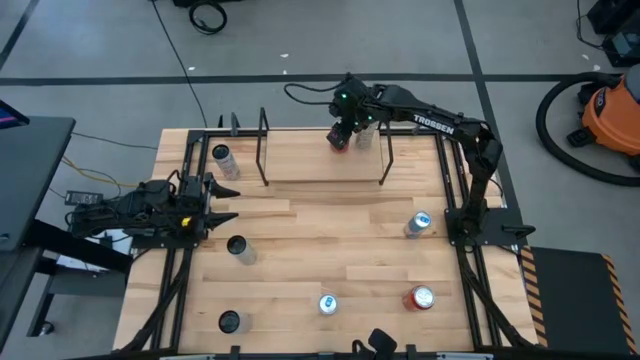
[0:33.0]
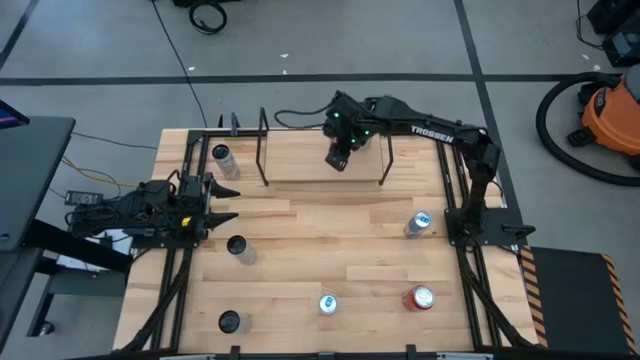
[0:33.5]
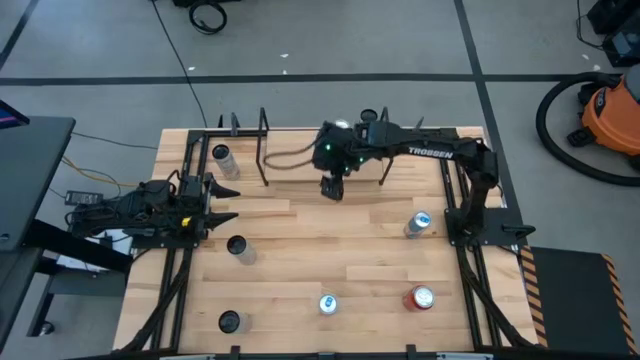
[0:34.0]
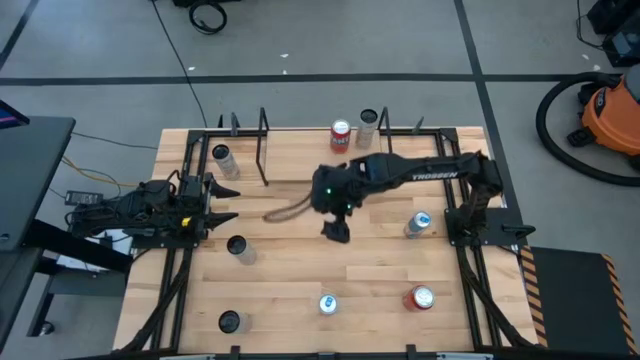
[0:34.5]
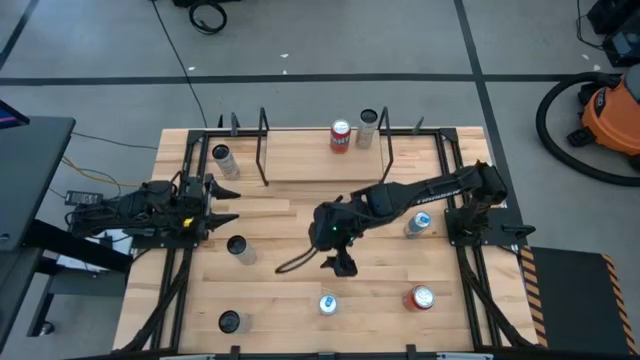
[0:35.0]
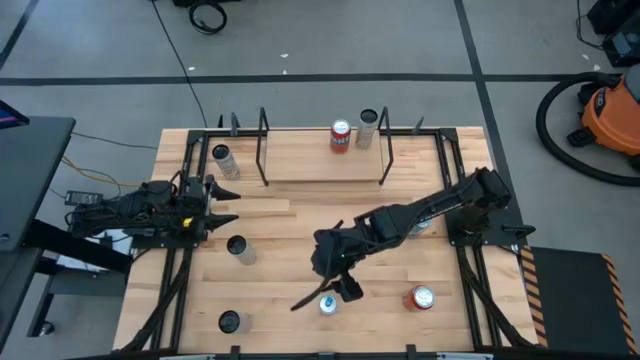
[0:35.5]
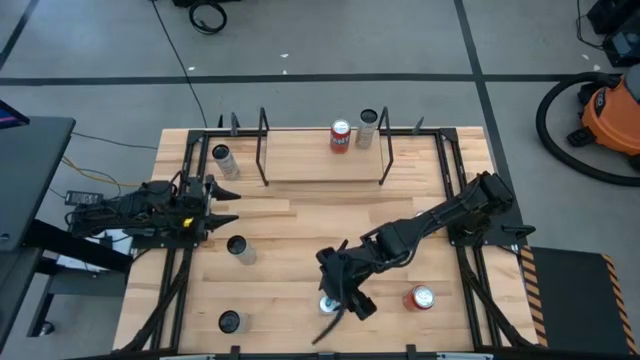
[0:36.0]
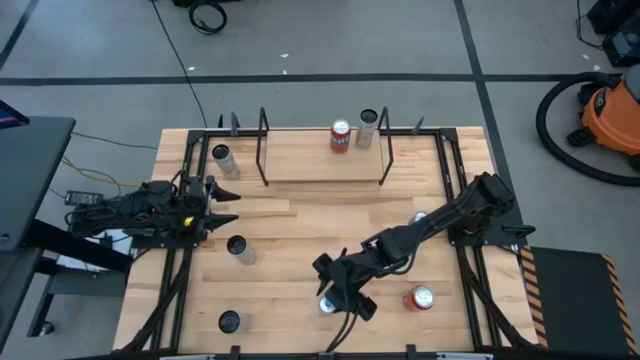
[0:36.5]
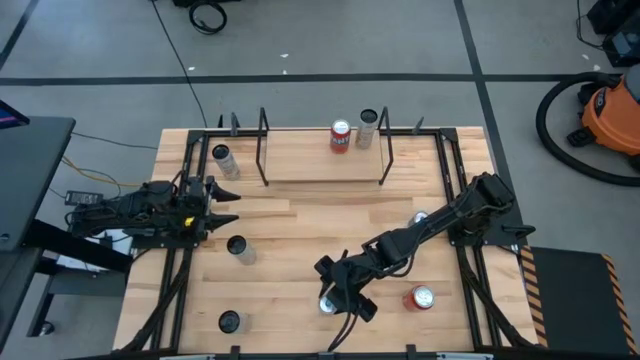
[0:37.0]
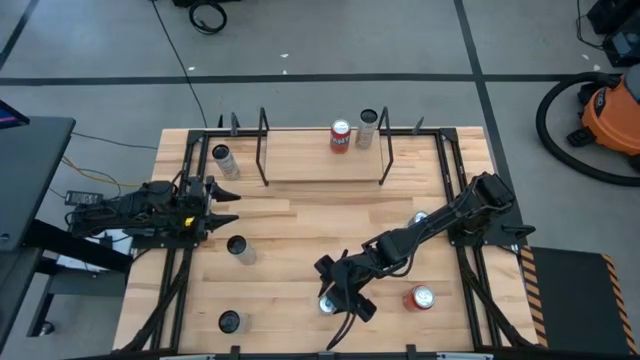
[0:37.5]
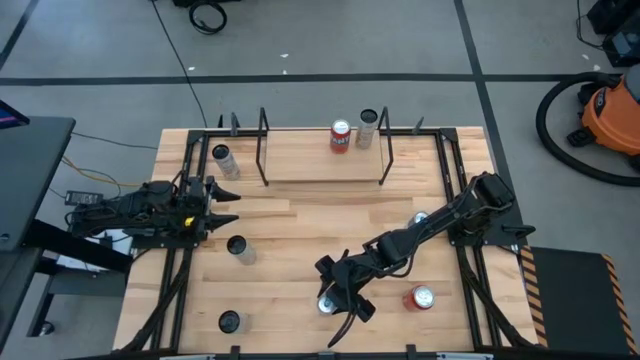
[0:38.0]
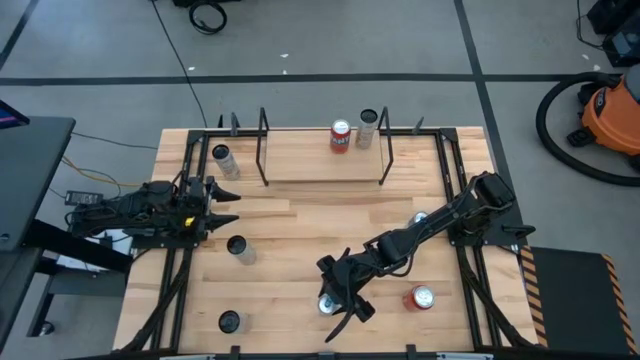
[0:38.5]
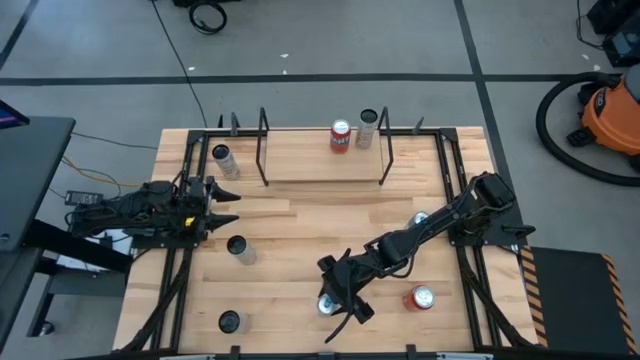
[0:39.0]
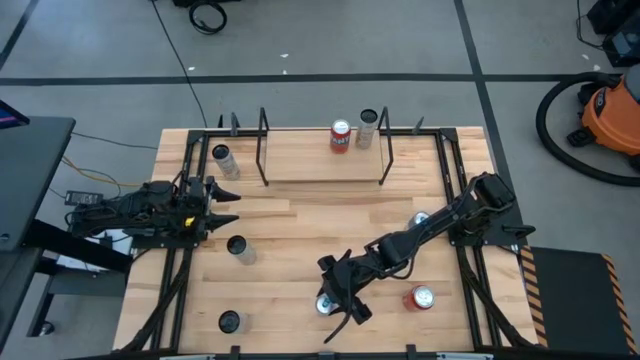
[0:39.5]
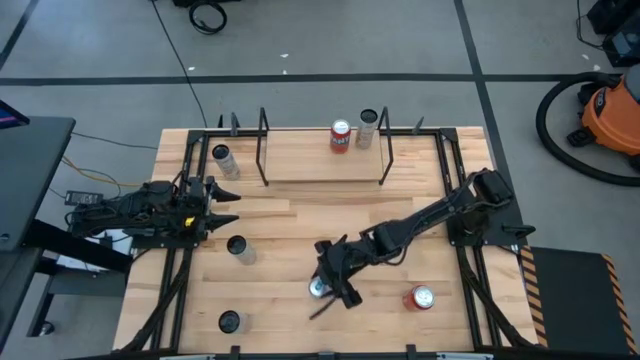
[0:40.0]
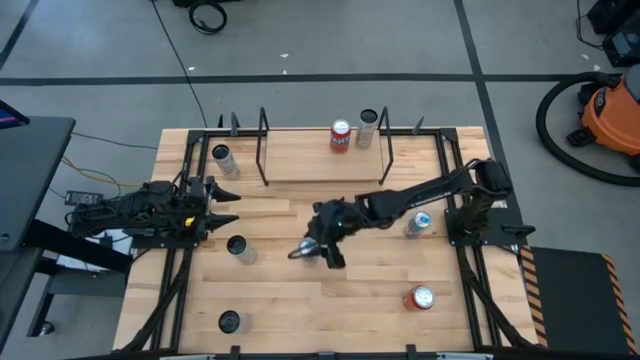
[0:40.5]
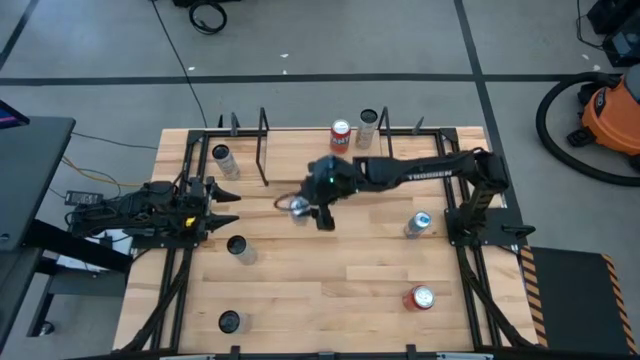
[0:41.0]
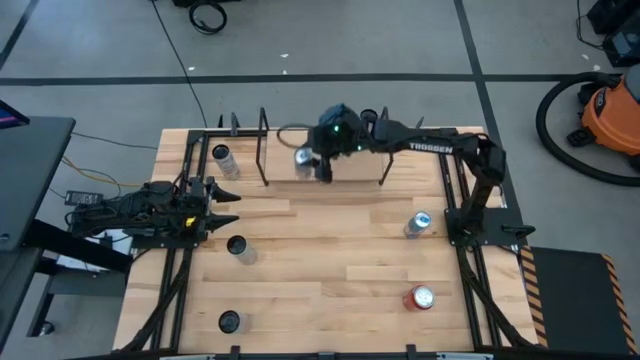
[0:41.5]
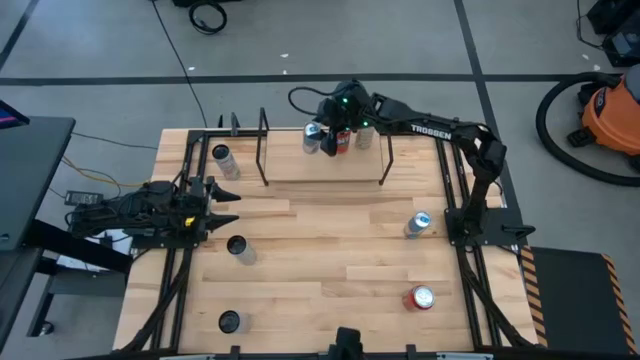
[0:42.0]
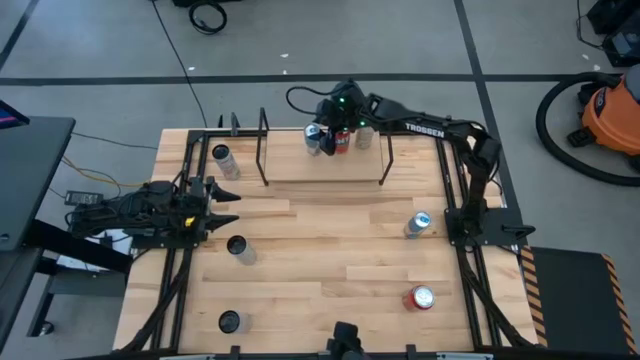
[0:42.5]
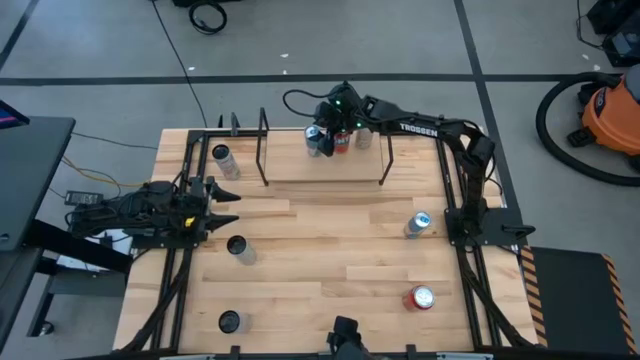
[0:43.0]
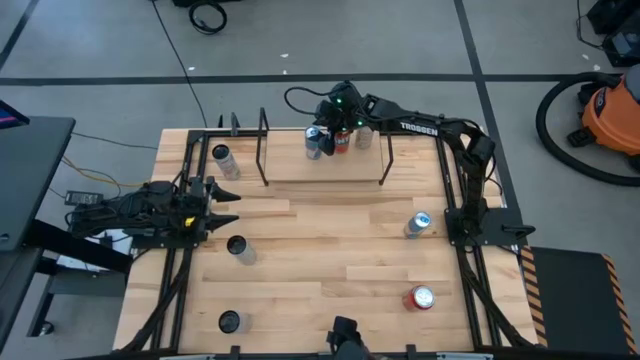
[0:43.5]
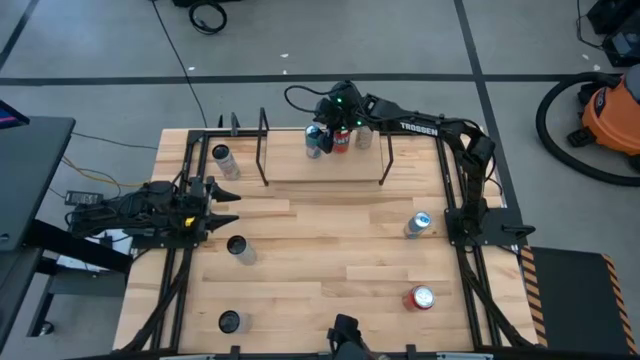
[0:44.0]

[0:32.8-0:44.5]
Task: Place canned beverage on shelf
Put the bottom blue soda can on the shelf

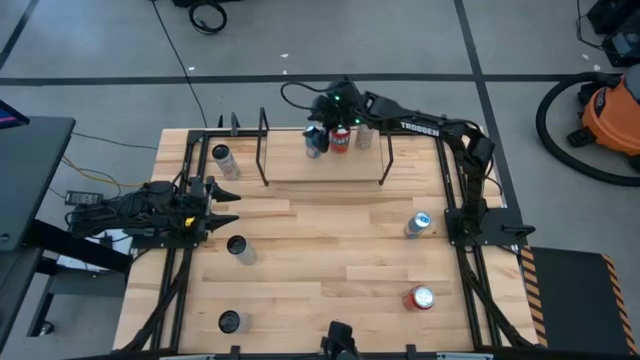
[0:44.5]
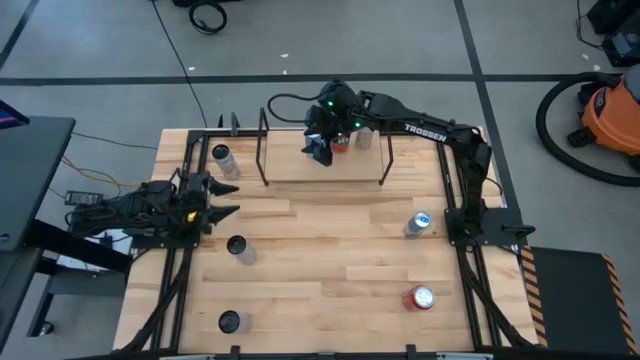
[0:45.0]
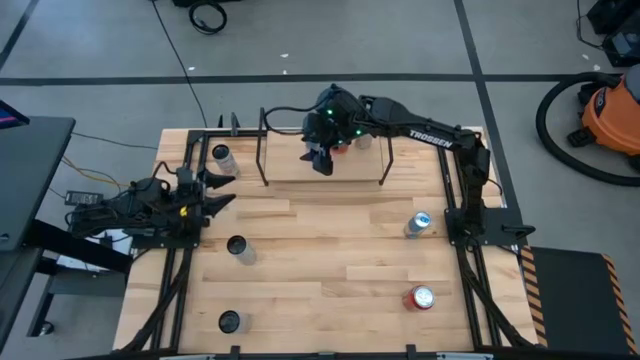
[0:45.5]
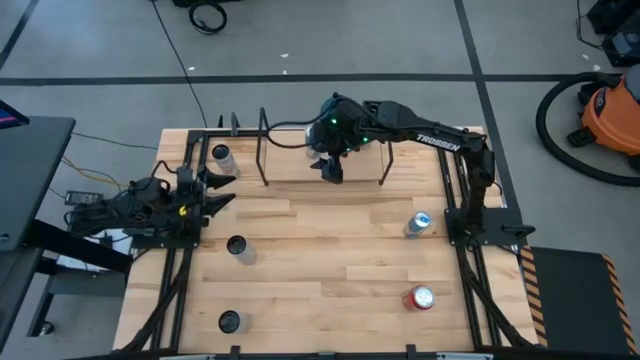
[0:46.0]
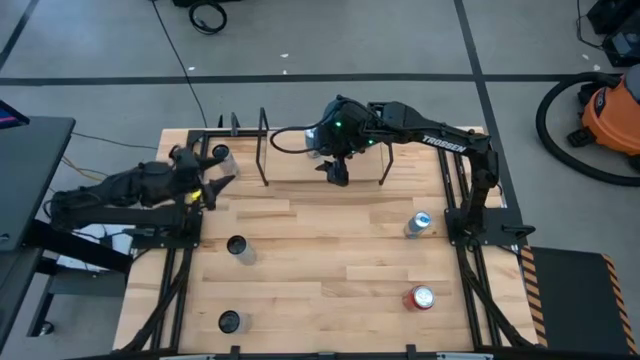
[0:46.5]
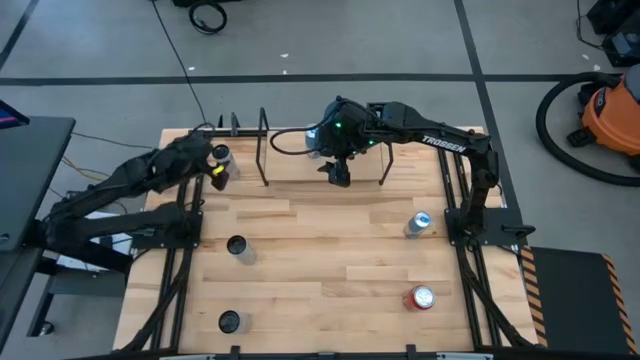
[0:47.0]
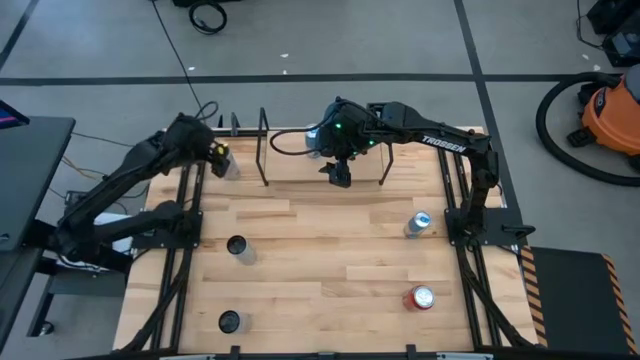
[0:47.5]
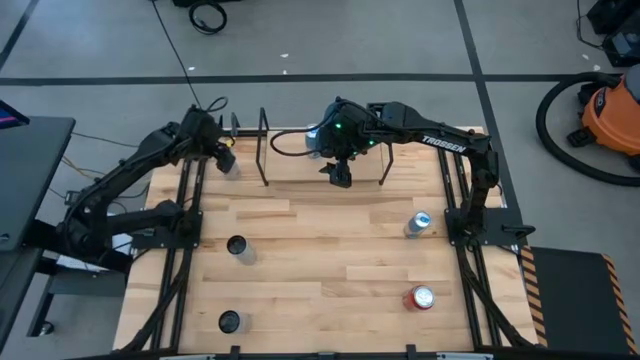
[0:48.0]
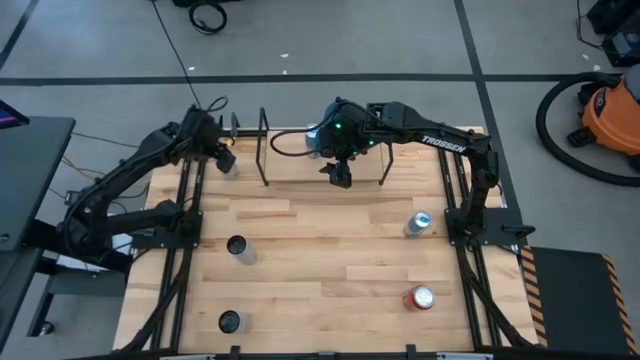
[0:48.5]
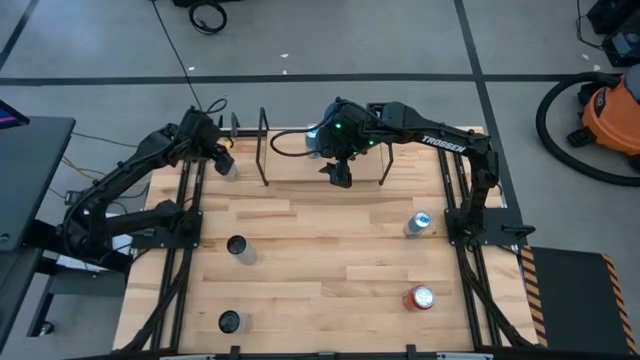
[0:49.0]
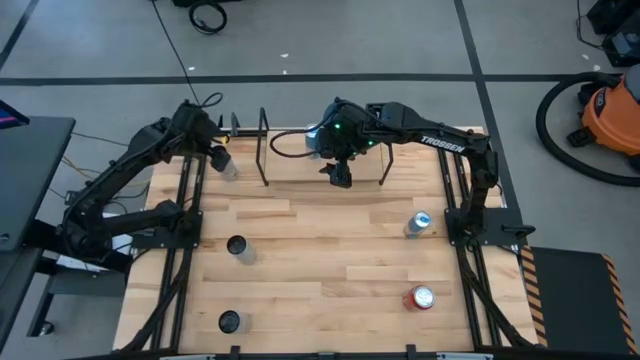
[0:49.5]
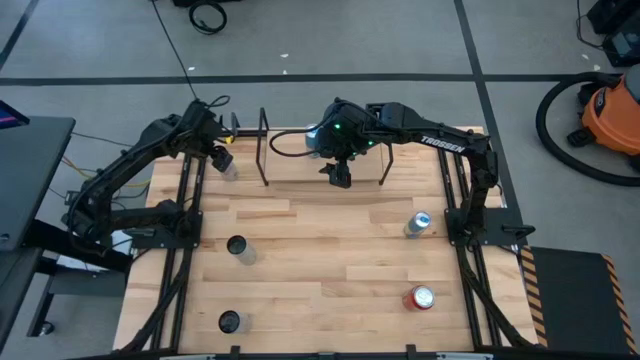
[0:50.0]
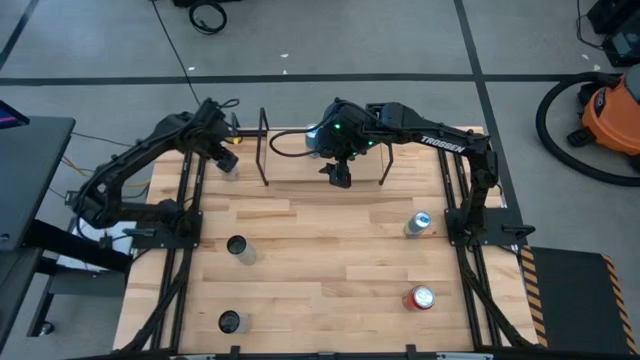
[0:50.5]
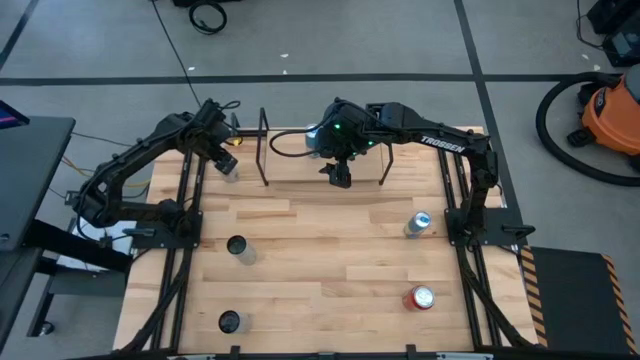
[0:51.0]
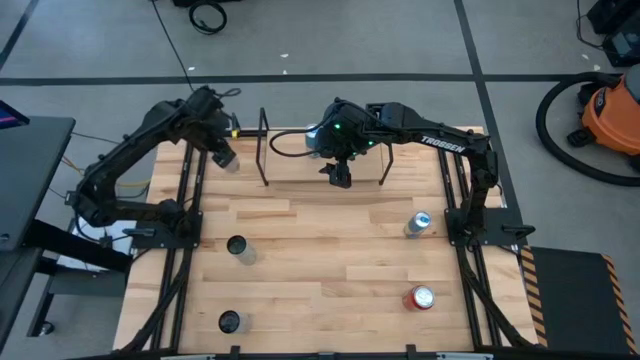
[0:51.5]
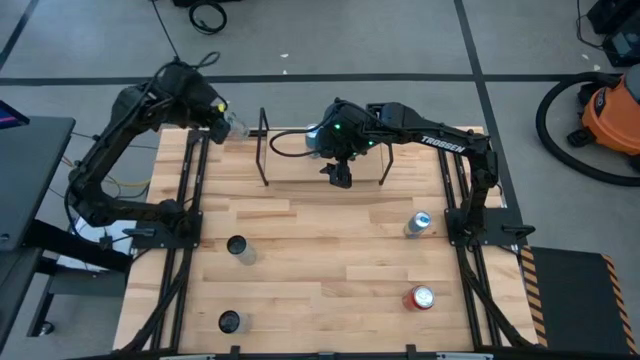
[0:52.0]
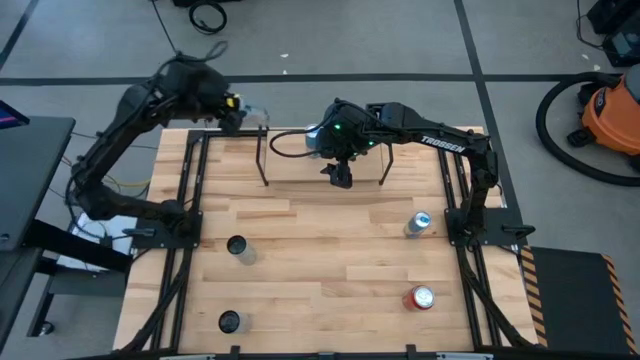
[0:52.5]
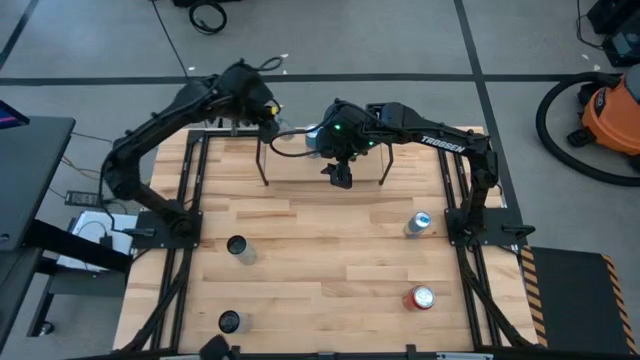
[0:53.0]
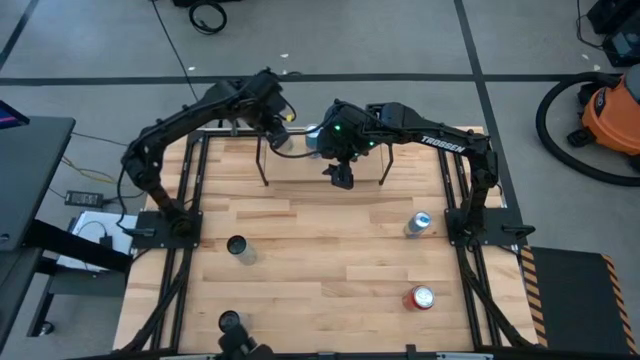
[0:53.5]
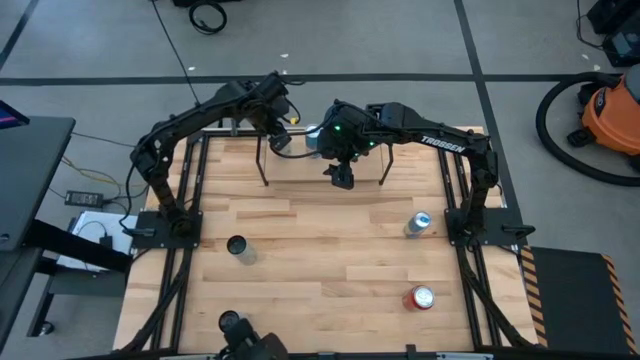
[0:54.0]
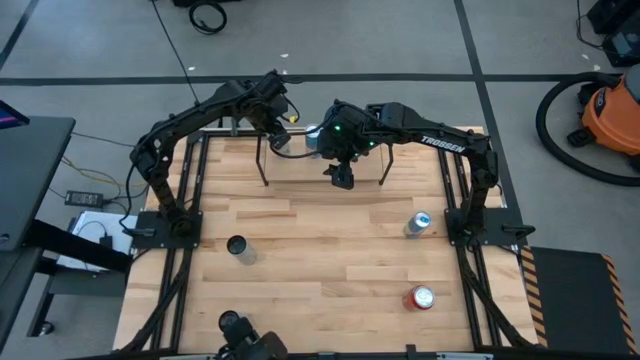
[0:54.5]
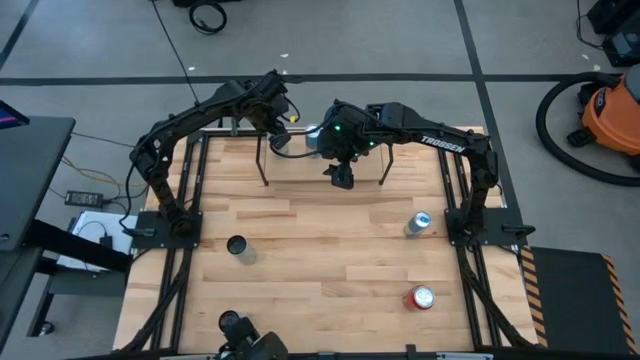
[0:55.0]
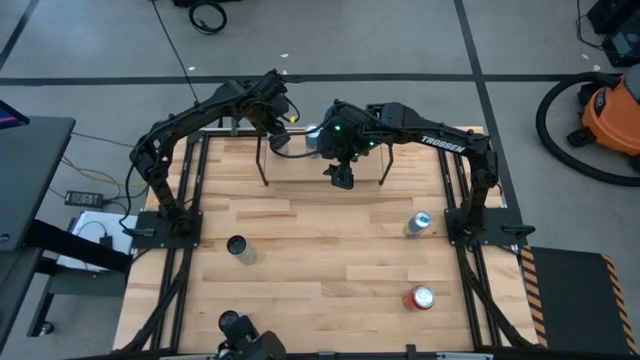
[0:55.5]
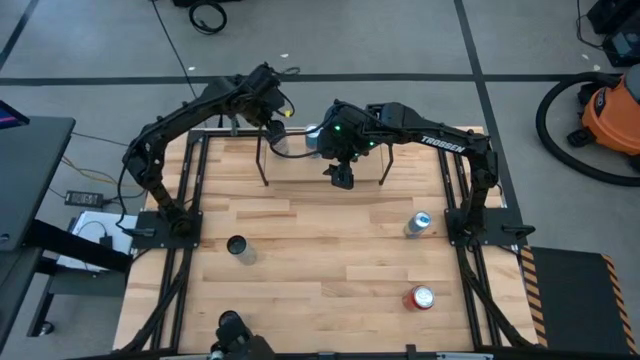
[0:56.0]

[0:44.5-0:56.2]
Put the top white pink soda can on the shelf
